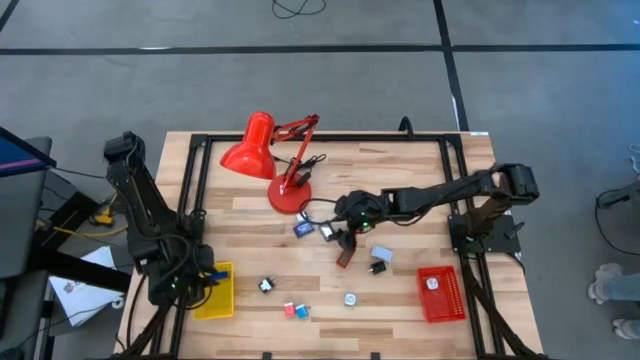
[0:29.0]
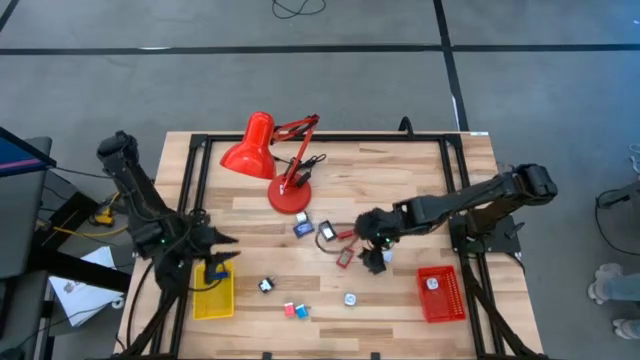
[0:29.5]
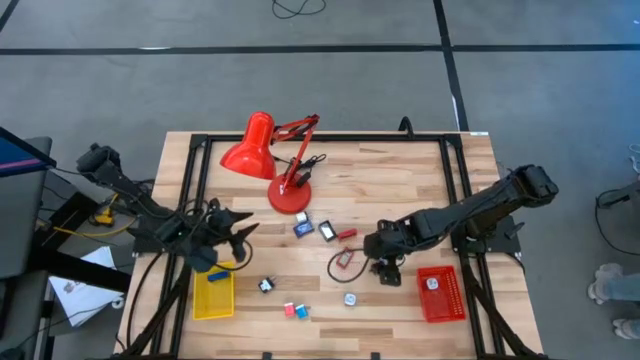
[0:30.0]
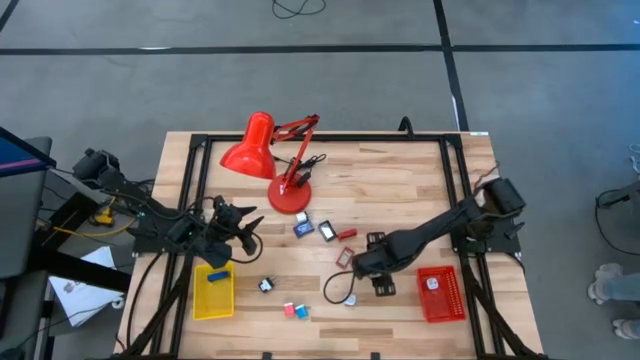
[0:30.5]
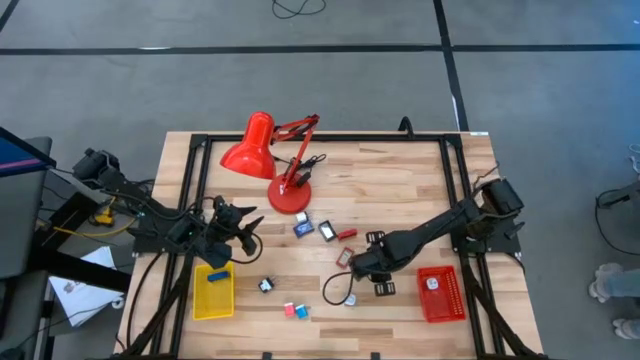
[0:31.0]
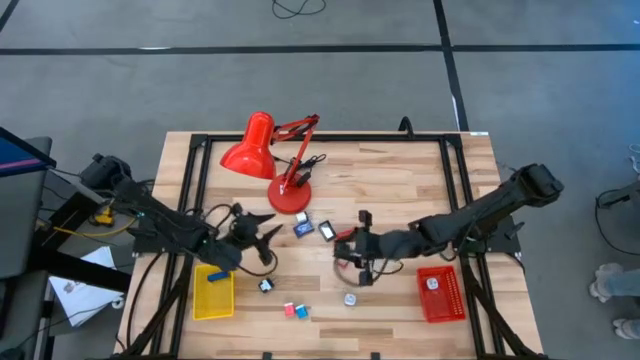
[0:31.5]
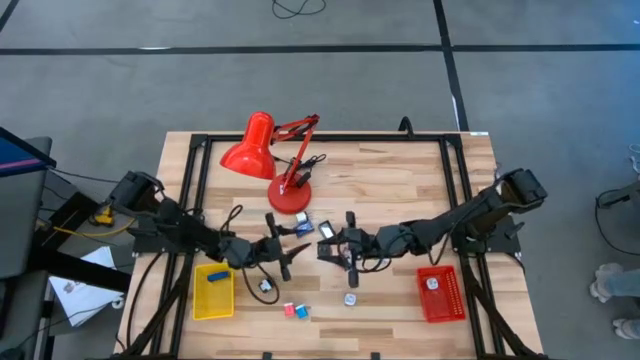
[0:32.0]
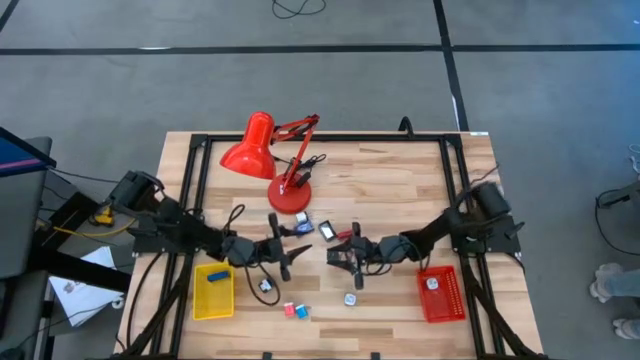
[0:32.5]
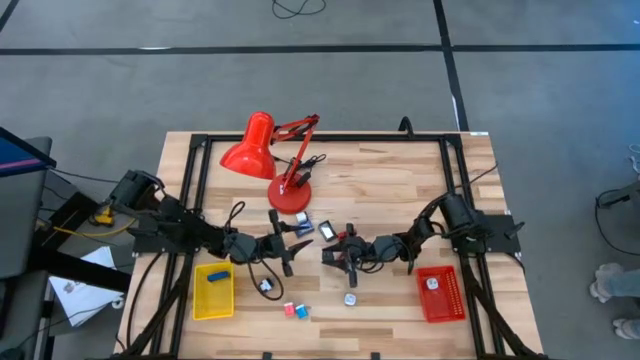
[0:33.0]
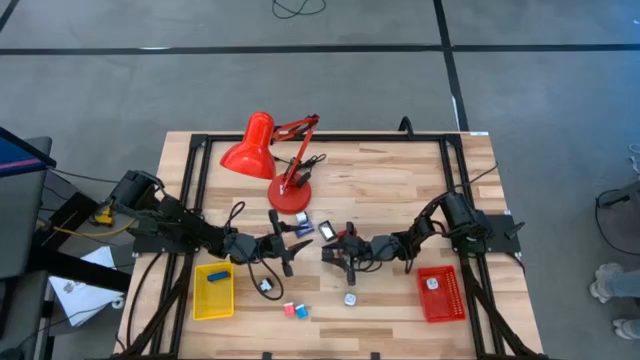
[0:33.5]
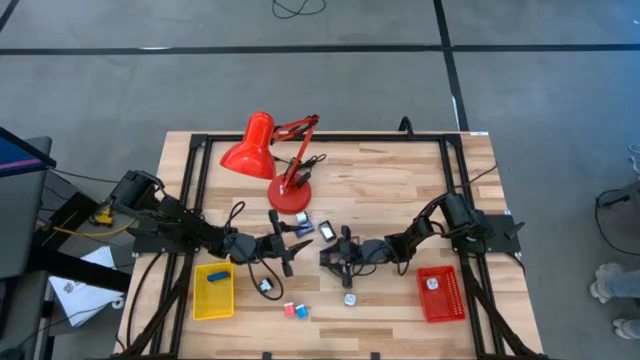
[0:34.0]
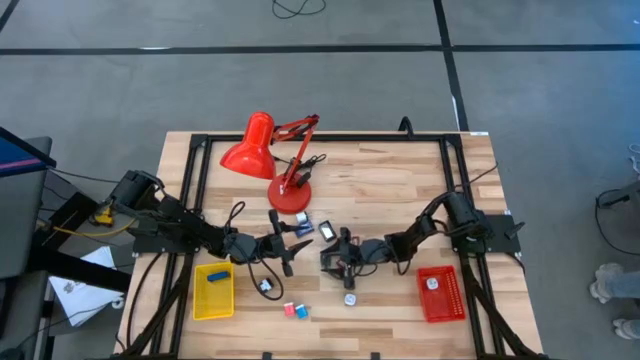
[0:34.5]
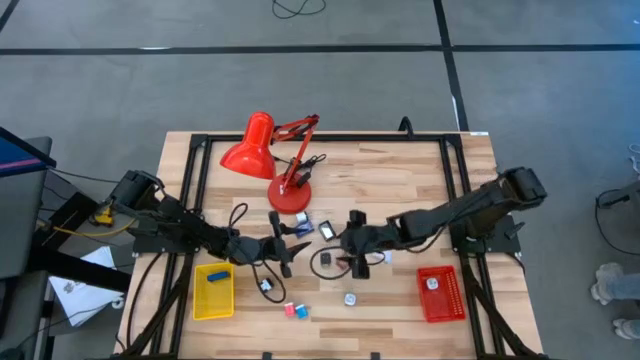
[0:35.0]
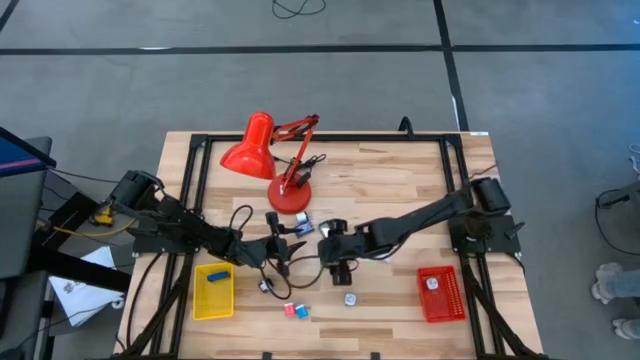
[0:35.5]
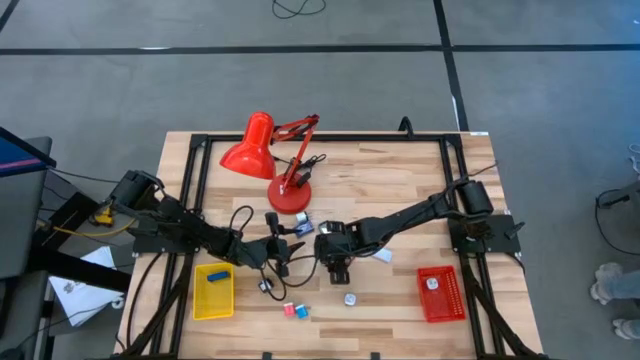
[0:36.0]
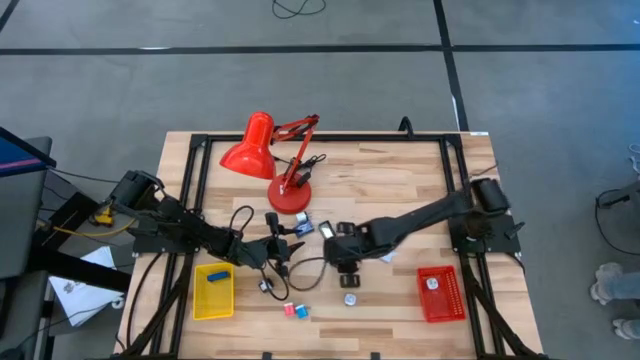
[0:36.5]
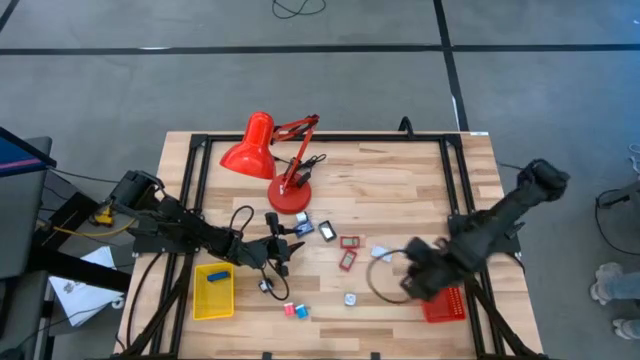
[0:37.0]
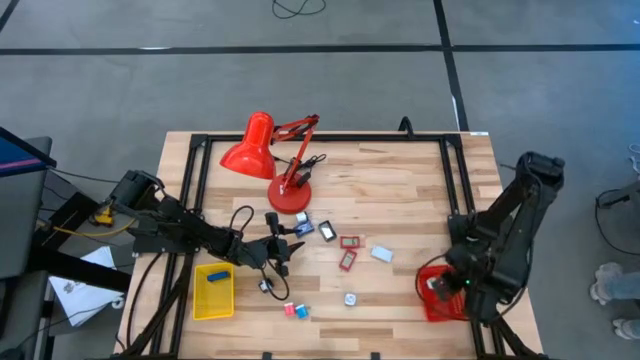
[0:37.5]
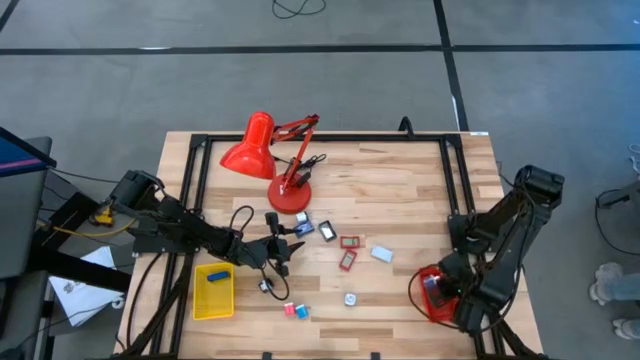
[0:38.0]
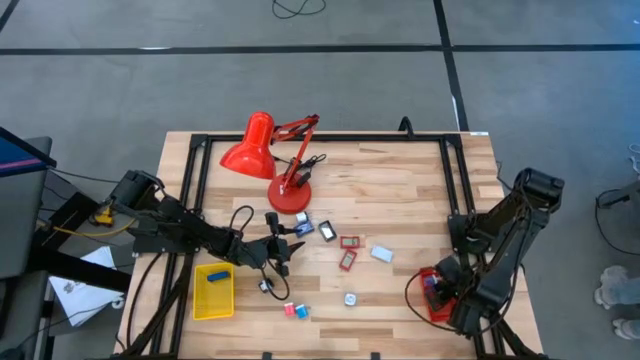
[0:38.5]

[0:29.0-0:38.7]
Task: Pick & Place Office items
Put the right black charger adapter into the red bin

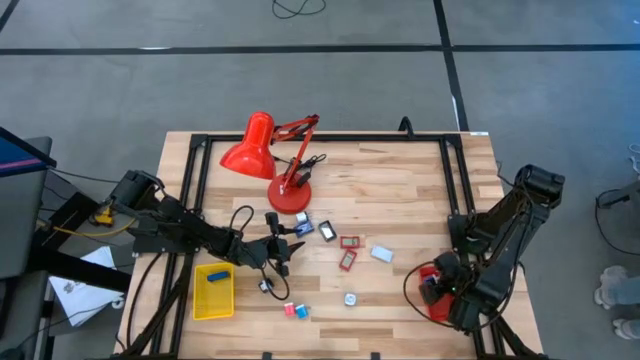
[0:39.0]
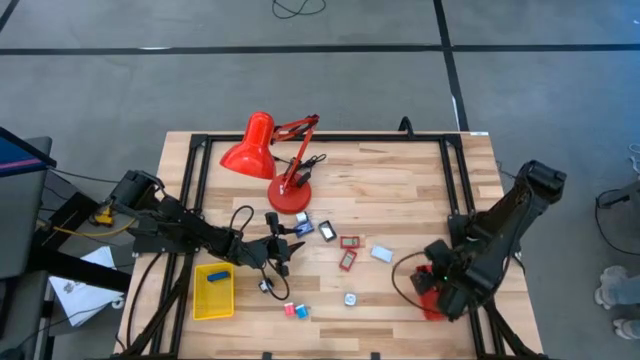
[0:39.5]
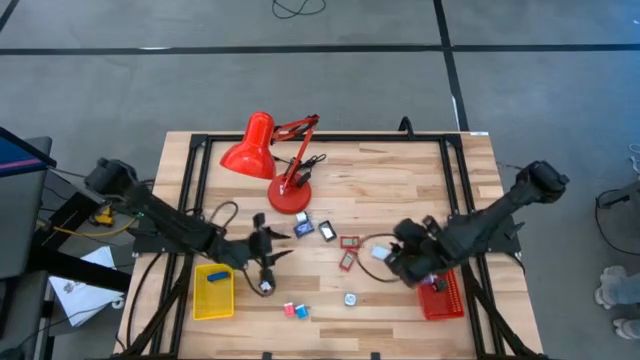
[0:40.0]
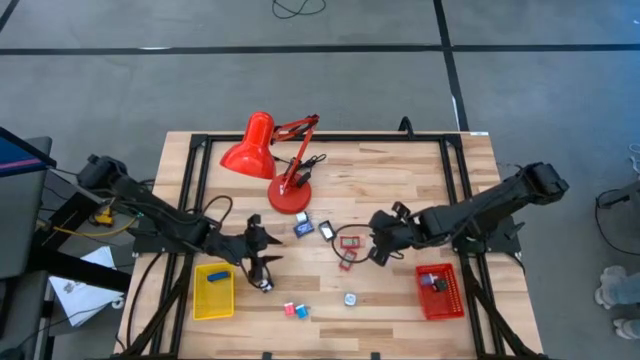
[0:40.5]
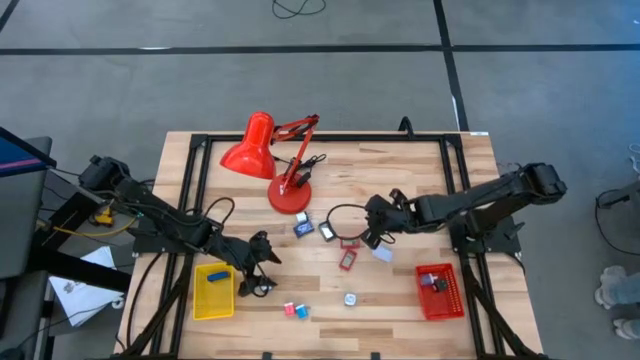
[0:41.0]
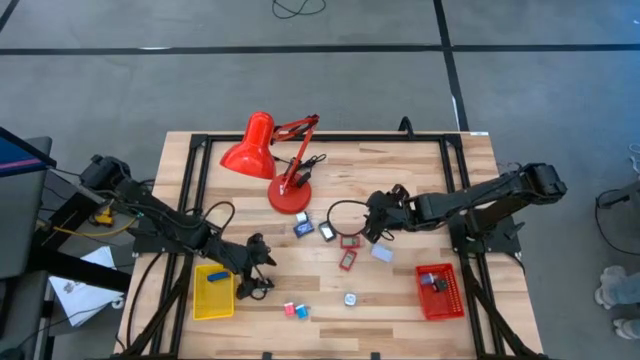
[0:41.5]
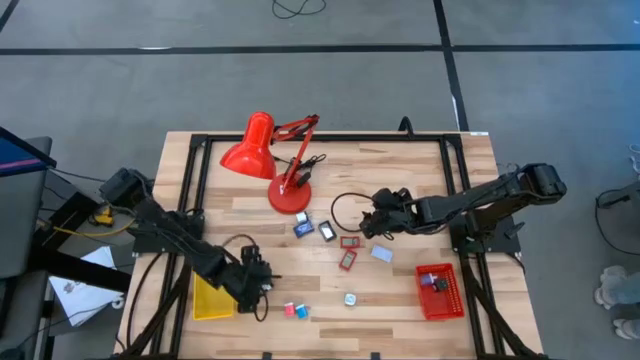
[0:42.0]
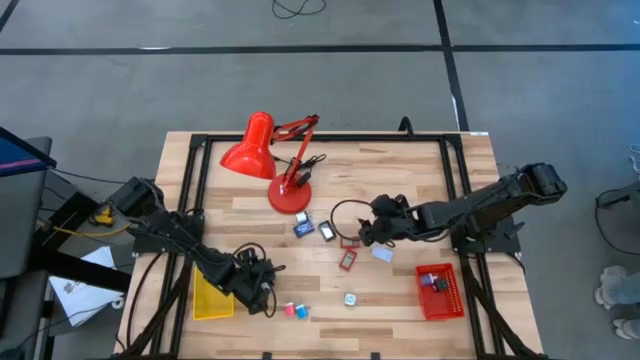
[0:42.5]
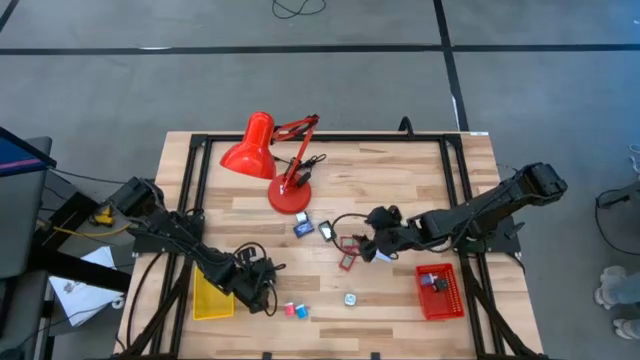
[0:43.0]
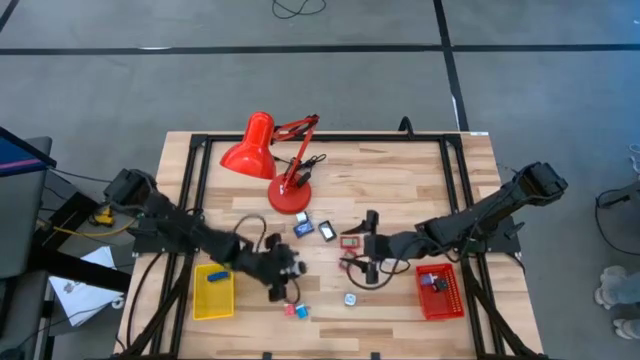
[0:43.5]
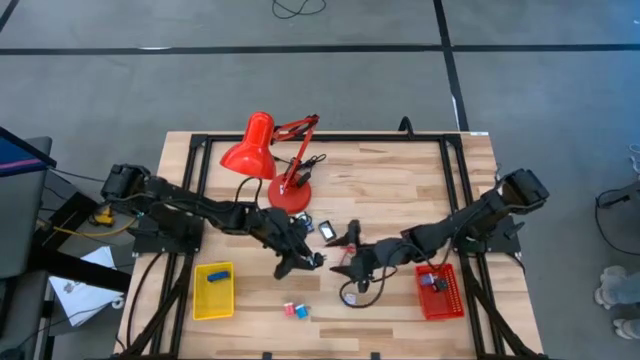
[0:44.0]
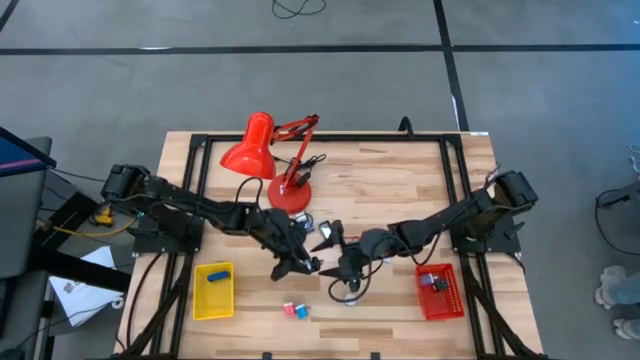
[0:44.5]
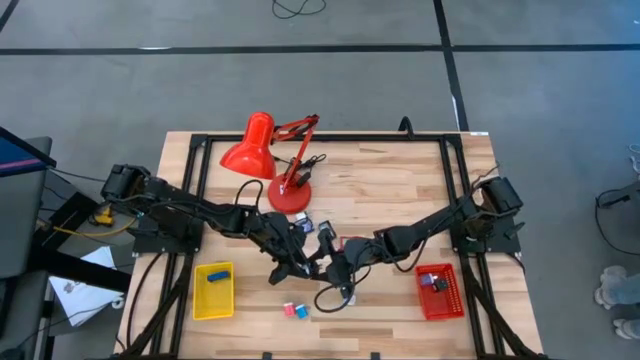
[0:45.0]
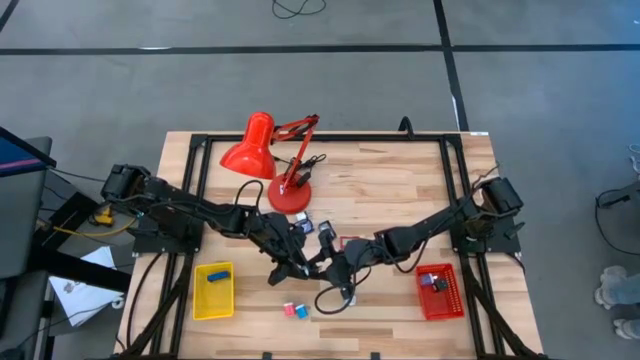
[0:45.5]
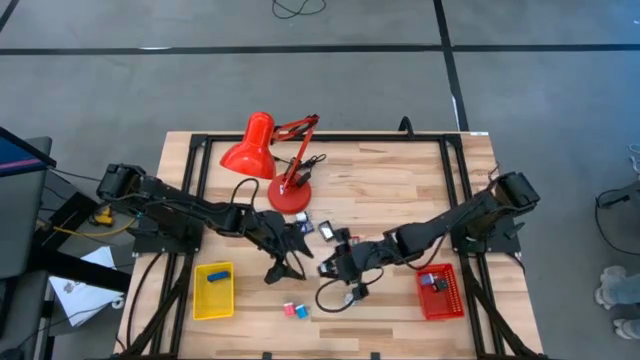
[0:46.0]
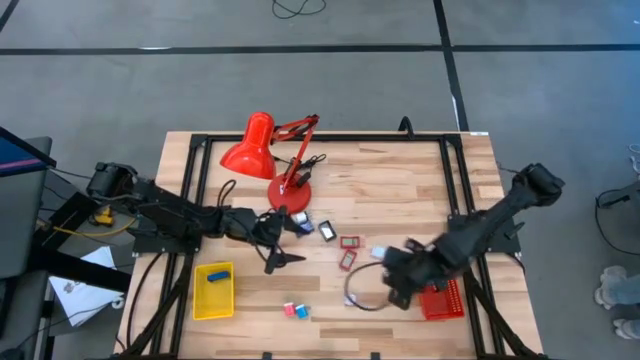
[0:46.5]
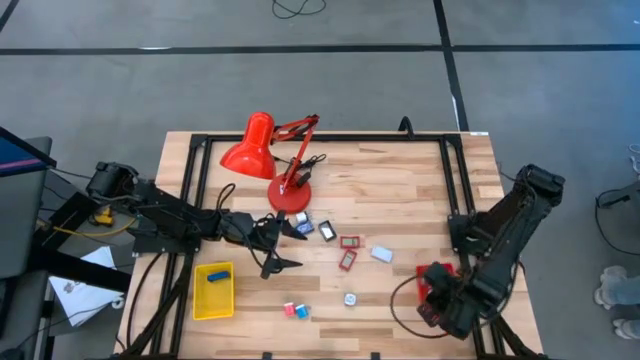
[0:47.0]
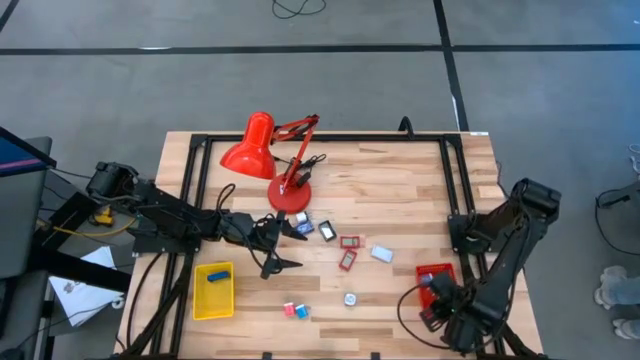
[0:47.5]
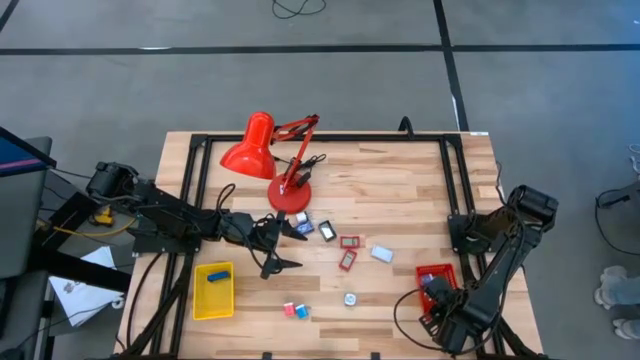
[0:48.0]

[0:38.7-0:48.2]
Put the black charger adapter into the red bin

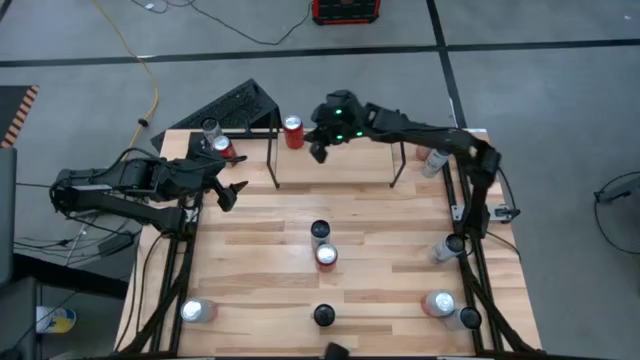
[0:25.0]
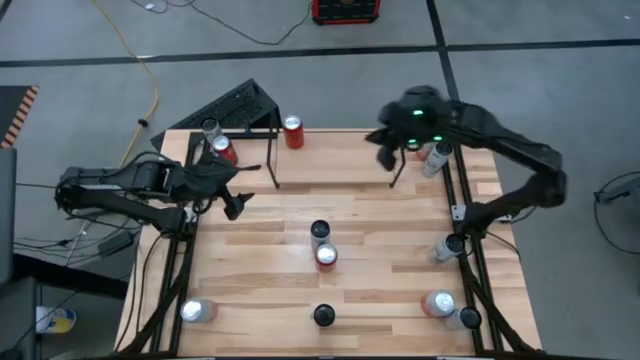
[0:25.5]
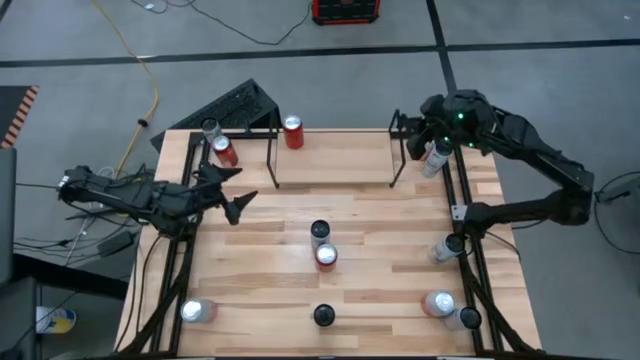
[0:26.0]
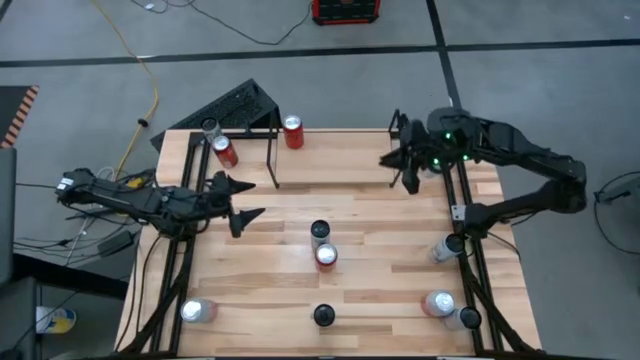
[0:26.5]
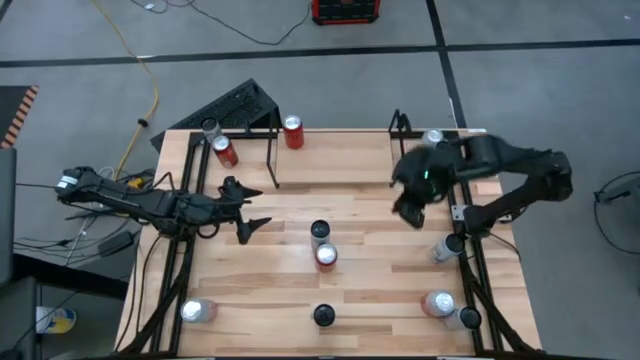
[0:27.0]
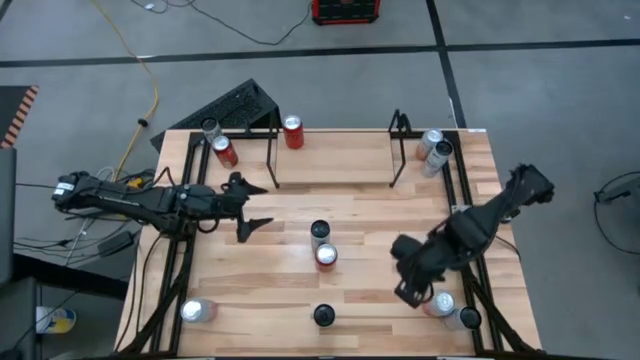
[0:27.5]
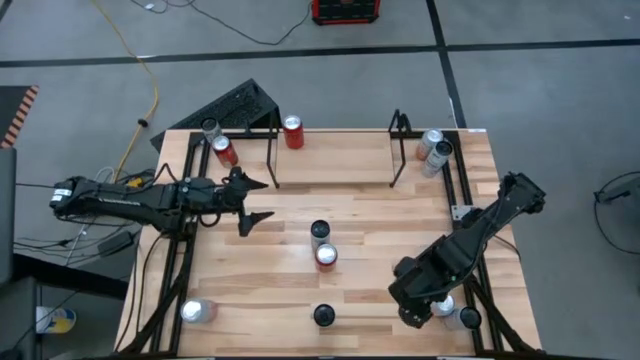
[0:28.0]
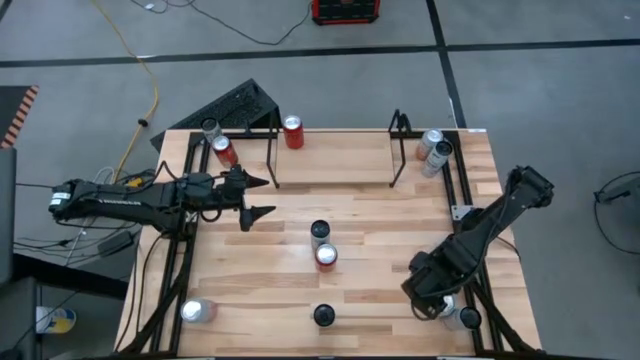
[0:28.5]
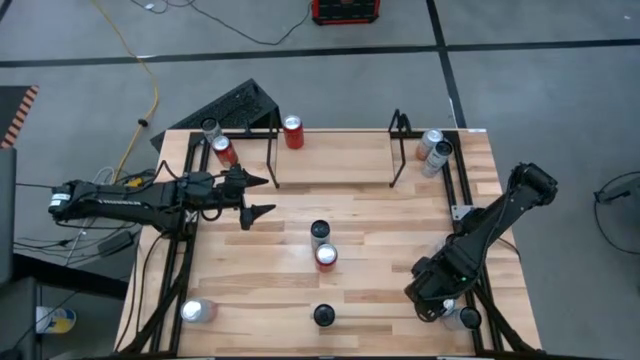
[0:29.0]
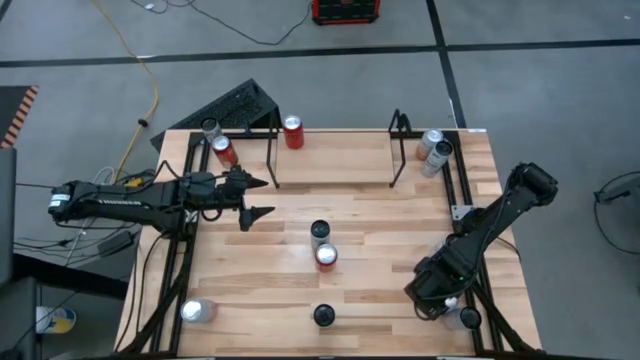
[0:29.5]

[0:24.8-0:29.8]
Task: Place canned beverage on shelf
Put the bottom right pink white soda can on the shelf
